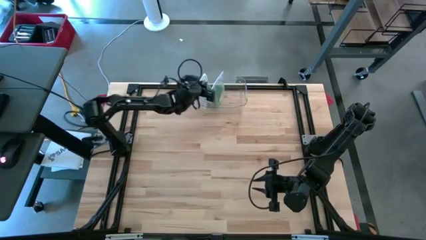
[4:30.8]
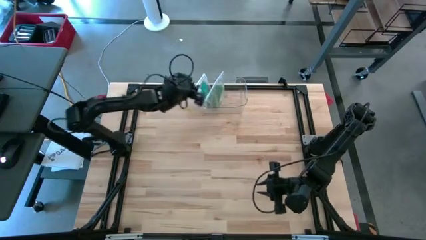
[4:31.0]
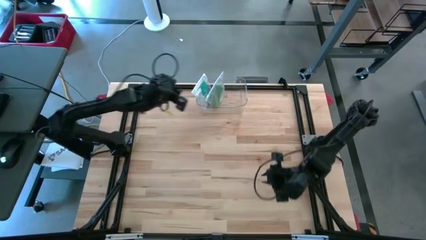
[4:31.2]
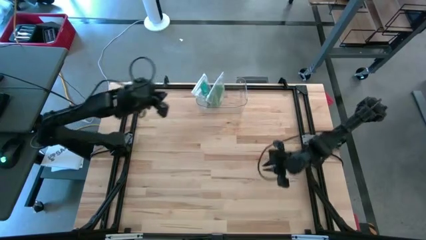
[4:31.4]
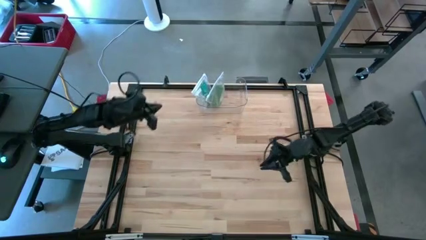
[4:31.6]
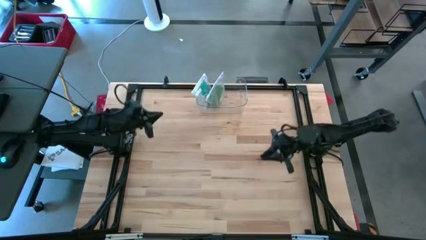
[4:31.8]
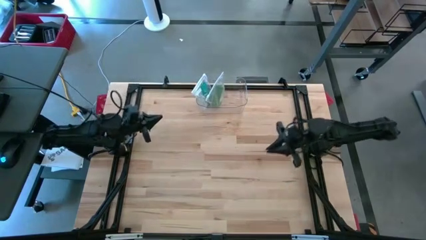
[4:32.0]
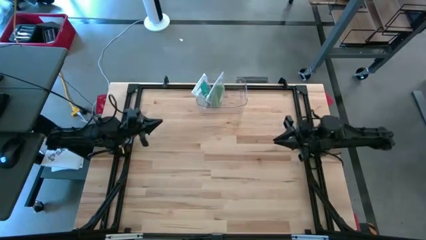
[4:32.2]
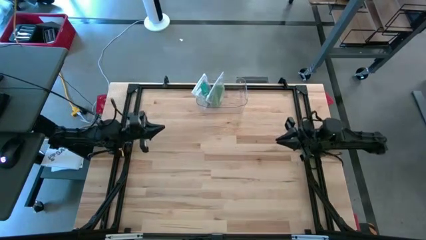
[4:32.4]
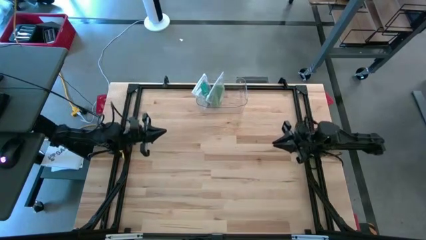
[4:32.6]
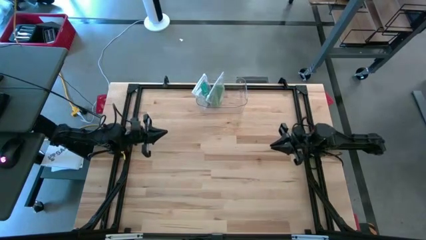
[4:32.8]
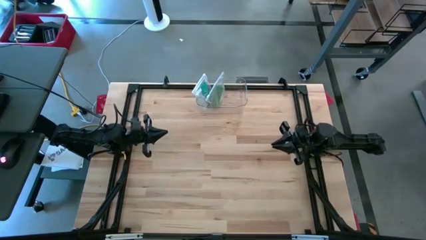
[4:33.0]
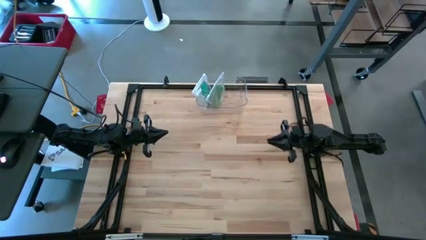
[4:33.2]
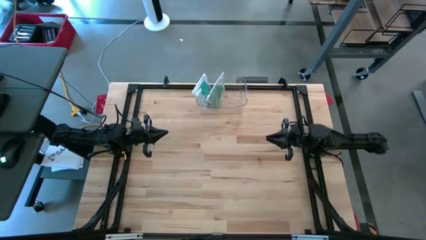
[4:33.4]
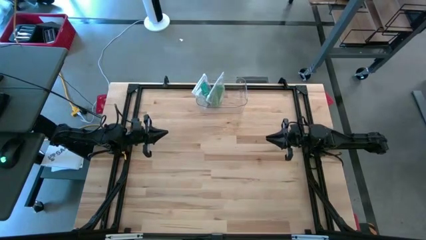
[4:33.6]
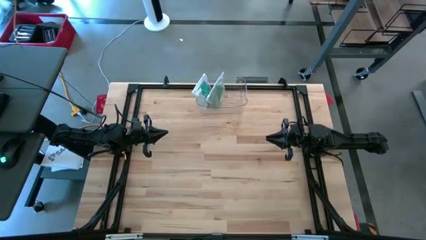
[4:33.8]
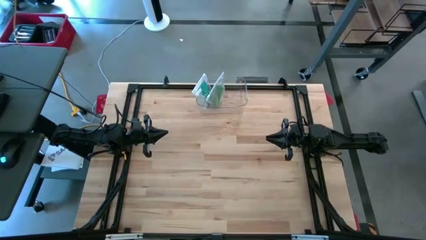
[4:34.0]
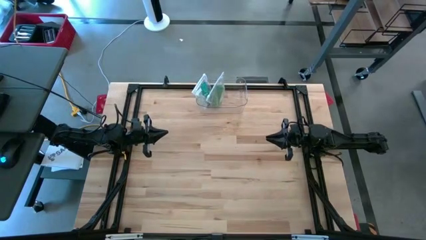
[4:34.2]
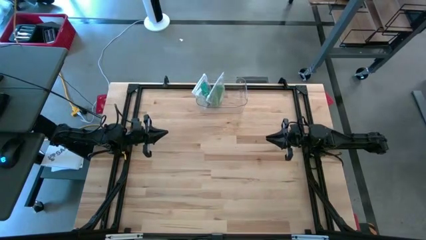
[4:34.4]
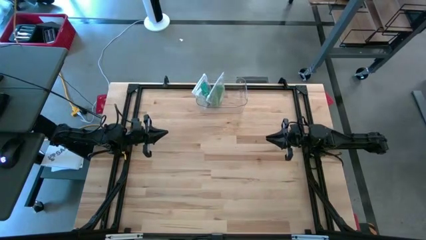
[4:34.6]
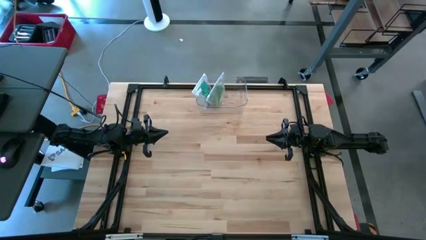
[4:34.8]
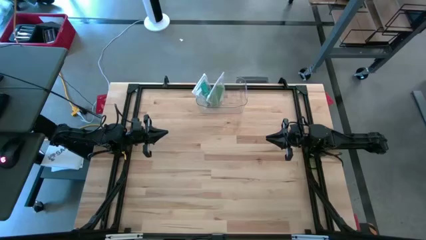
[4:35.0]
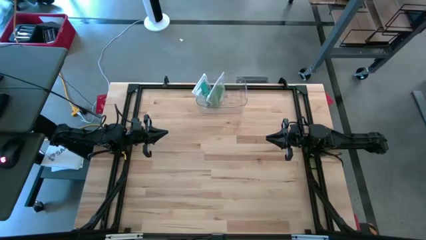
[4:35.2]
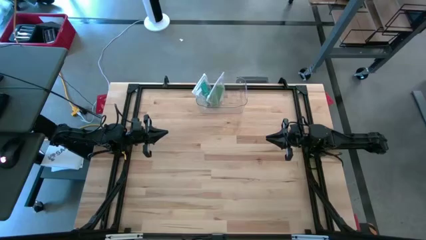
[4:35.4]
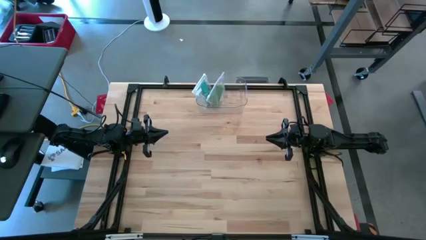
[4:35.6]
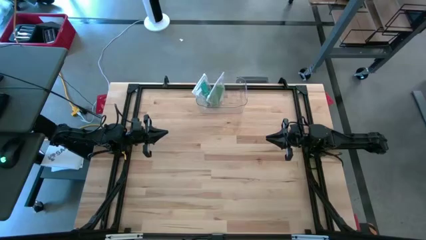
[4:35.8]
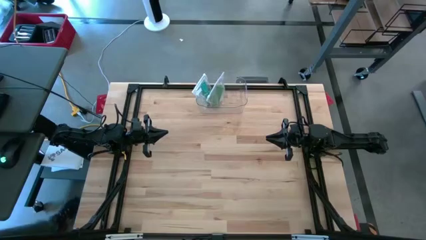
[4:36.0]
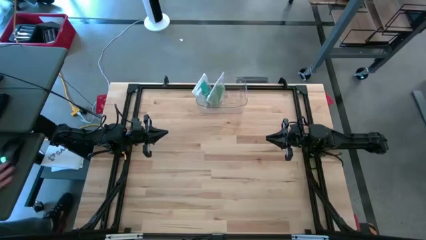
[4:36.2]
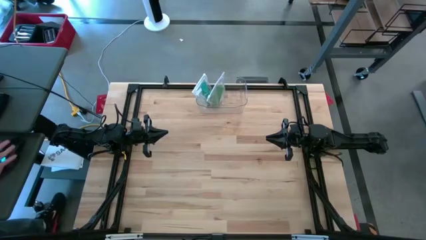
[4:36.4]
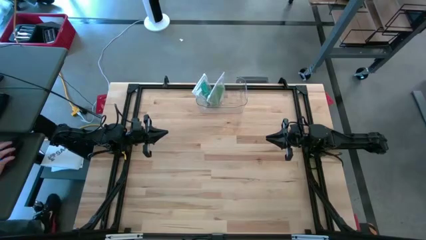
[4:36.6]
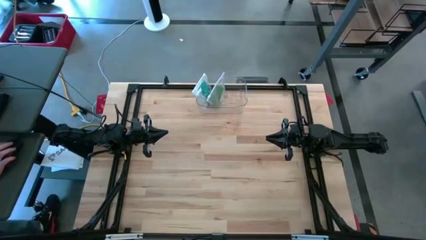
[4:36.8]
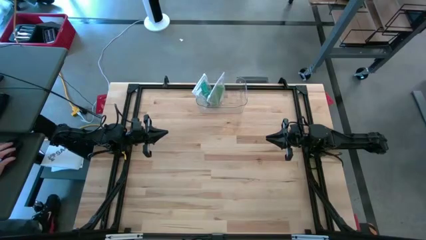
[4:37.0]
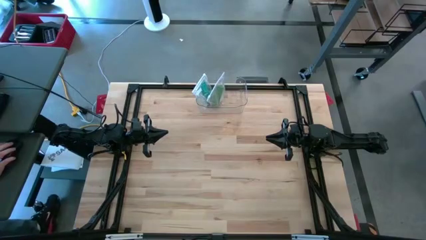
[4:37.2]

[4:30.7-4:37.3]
Task: Roll bandage
Return to Home Position

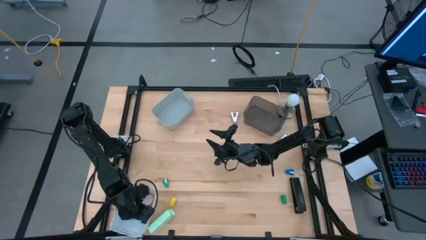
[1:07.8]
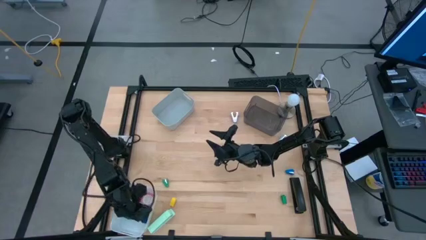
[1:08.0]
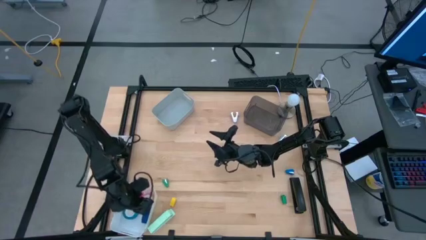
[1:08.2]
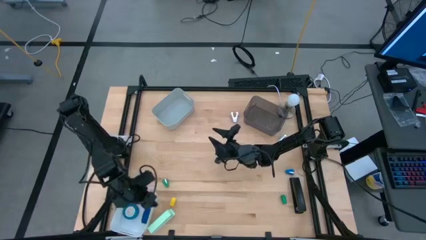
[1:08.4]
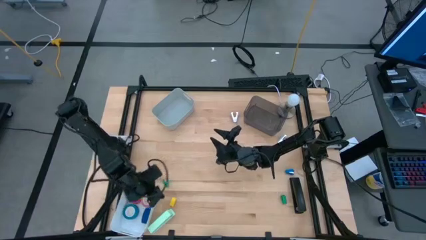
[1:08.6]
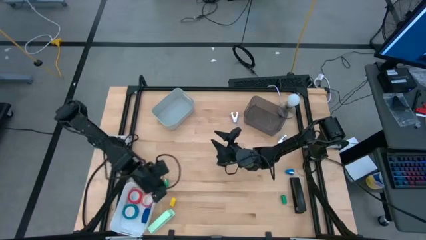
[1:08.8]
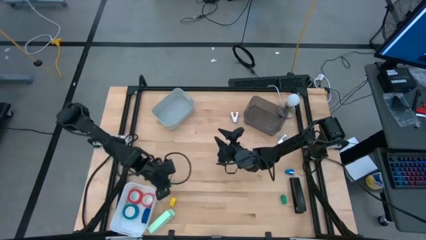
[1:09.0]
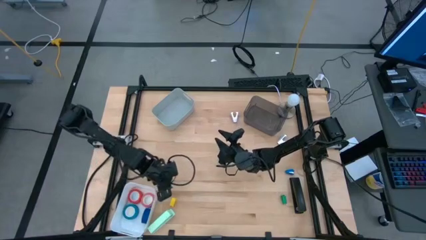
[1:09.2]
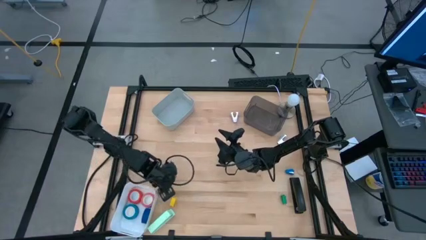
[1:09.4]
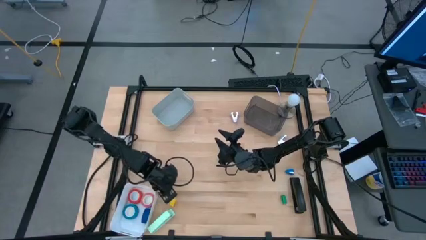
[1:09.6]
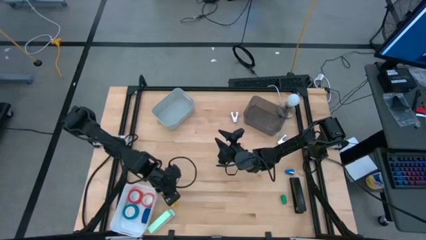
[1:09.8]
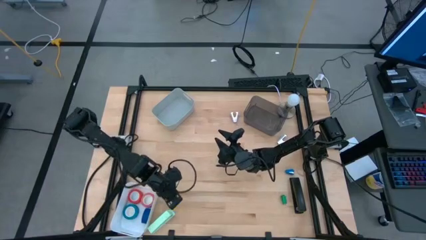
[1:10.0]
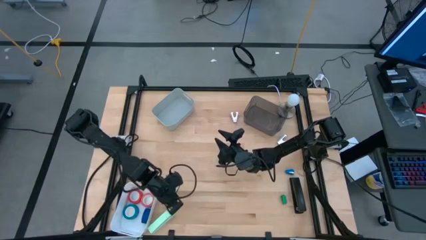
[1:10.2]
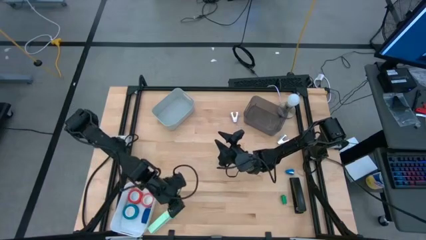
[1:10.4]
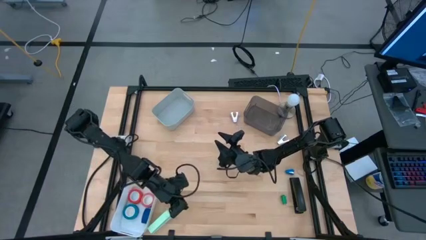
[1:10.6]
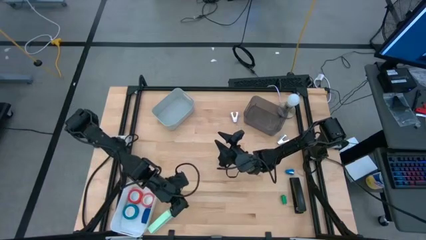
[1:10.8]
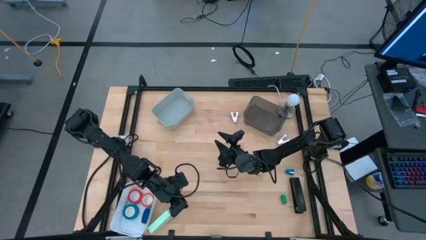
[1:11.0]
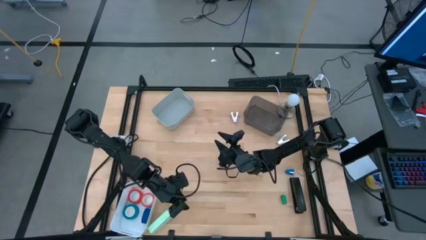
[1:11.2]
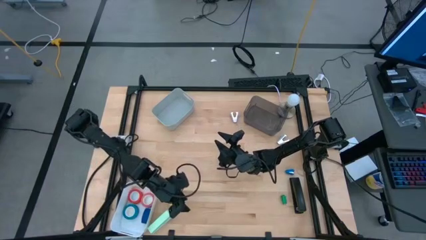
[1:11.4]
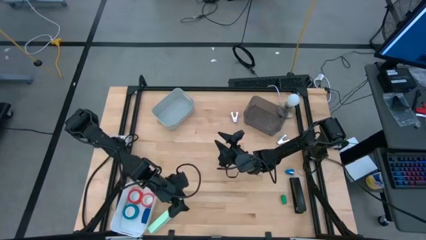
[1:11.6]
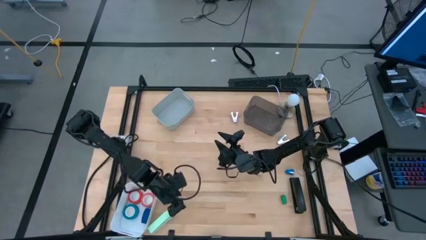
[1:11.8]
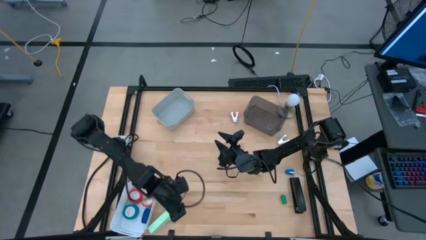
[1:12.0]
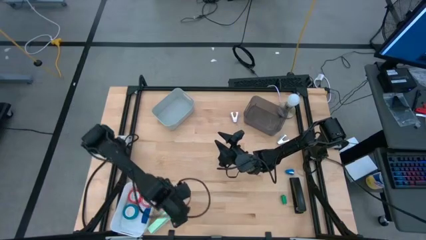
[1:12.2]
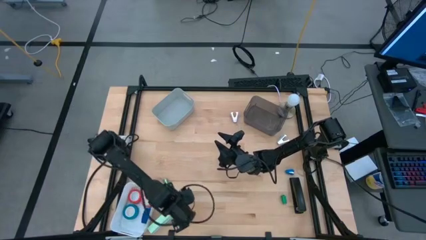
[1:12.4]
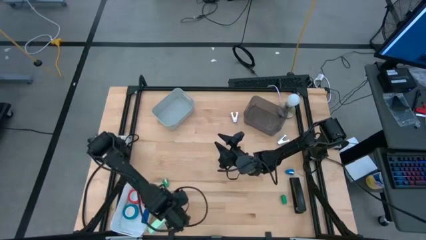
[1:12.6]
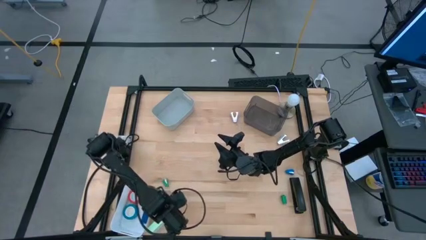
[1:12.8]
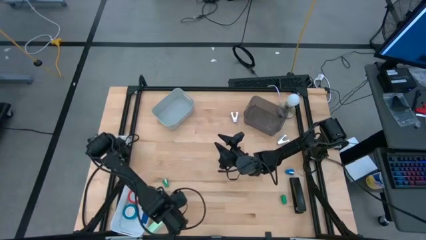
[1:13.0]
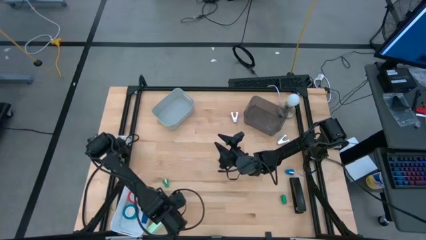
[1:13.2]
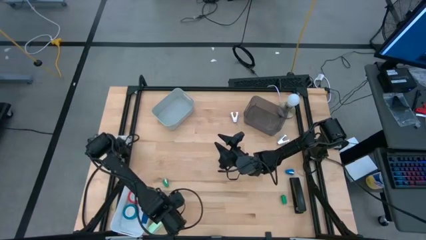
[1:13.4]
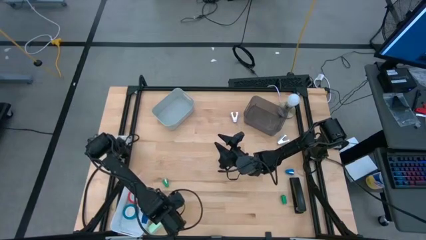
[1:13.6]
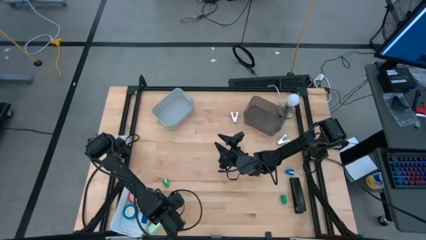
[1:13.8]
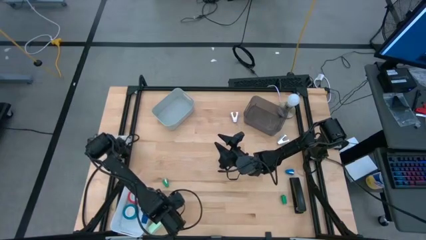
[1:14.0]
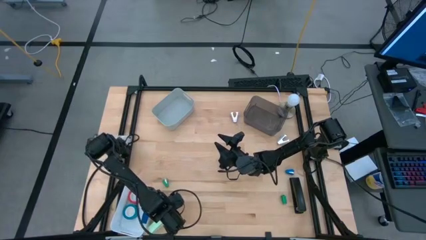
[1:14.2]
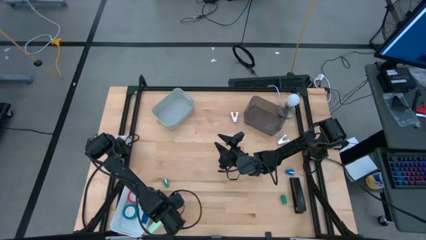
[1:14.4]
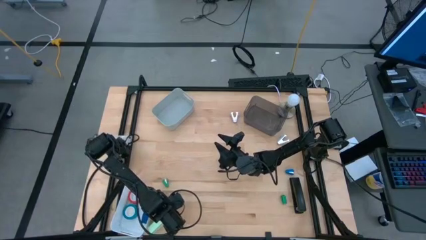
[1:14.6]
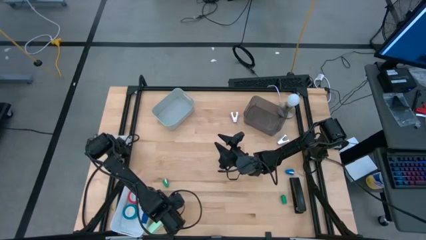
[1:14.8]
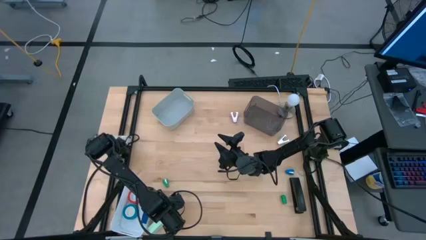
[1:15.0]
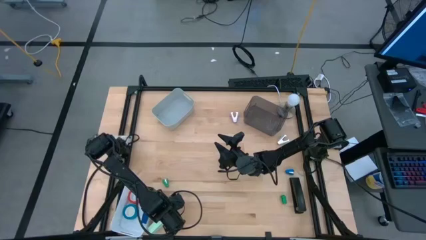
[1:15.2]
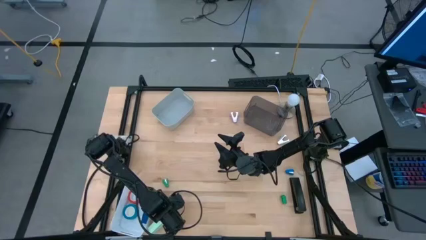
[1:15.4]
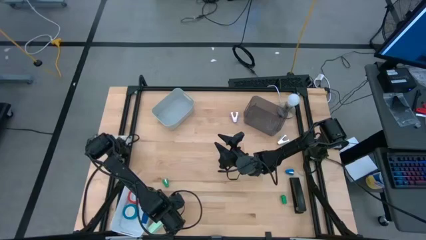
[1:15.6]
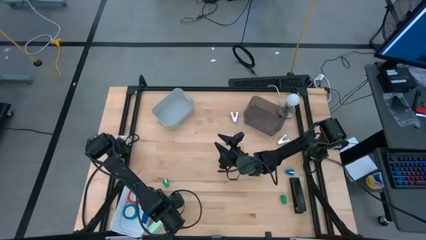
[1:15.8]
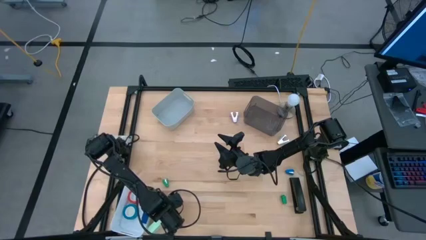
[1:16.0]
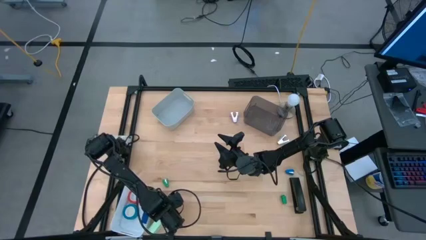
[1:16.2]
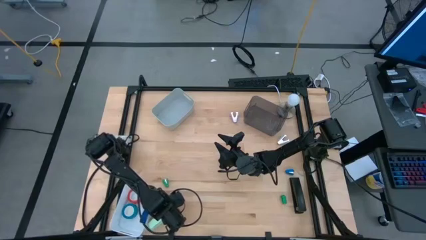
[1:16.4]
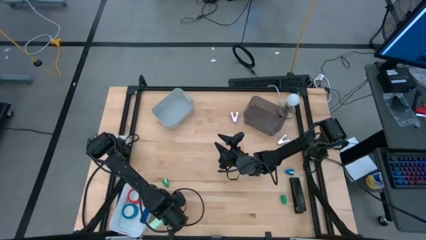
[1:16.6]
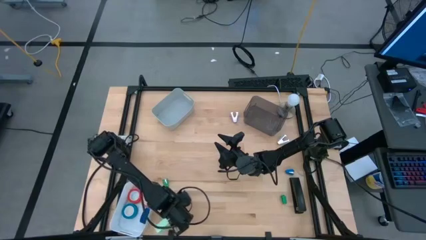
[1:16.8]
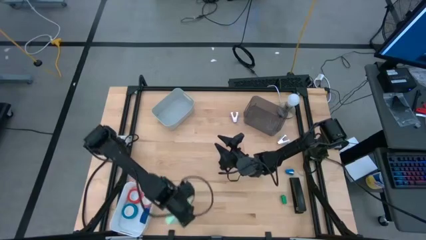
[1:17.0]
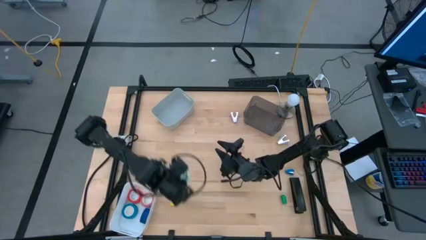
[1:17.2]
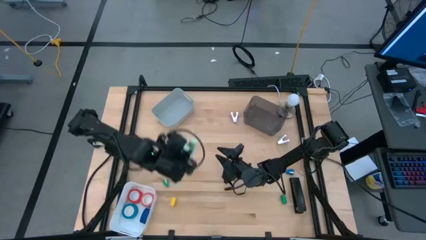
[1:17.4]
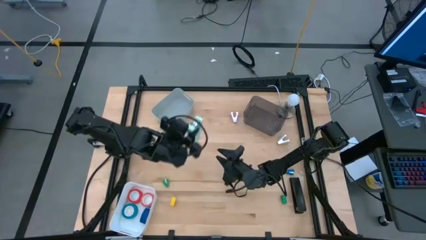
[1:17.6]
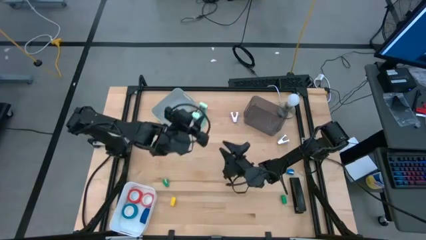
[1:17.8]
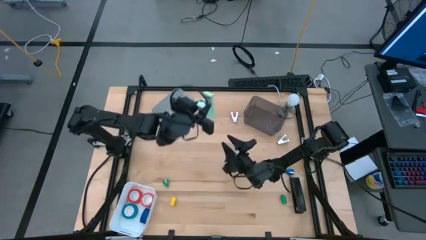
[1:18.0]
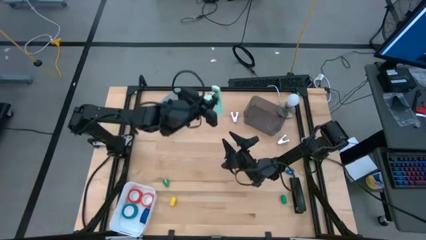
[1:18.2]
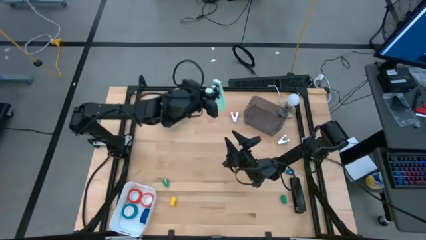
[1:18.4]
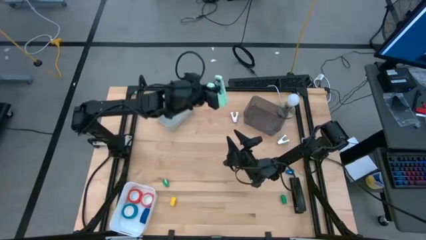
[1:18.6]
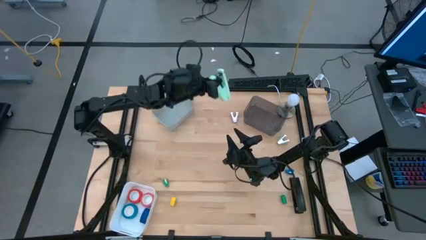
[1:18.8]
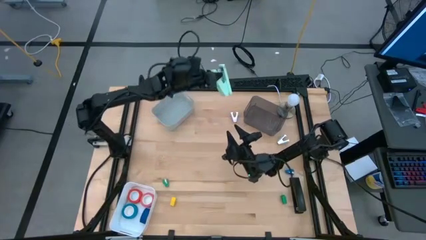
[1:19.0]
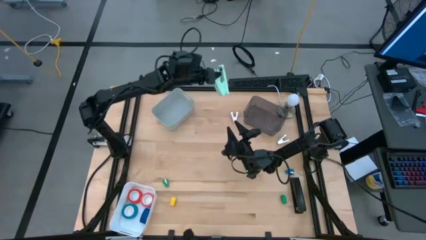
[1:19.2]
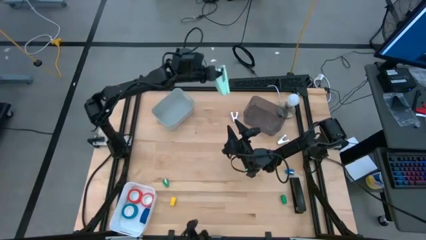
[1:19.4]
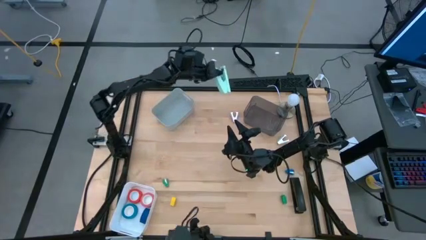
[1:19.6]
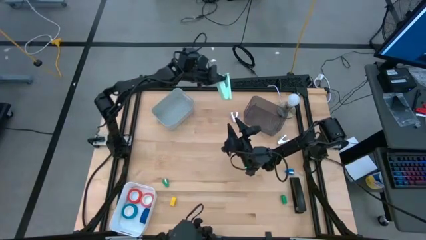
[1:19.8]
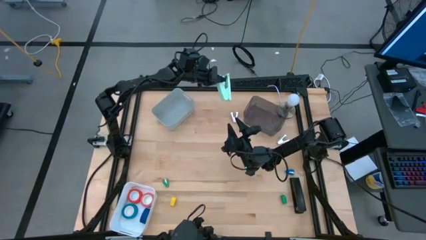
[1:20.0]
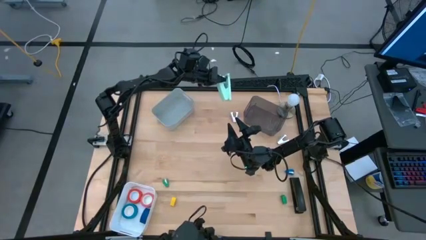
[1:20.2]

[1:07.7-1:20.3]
Task: Pick and place Stapler, Stapler remover, tape
Put the big light green stapler into the black bin
